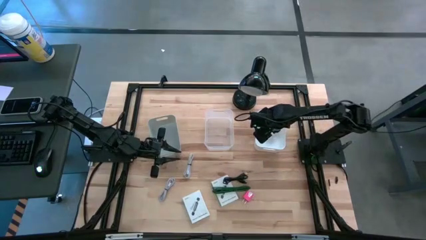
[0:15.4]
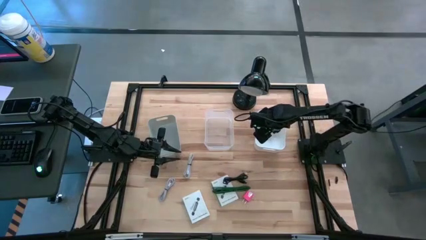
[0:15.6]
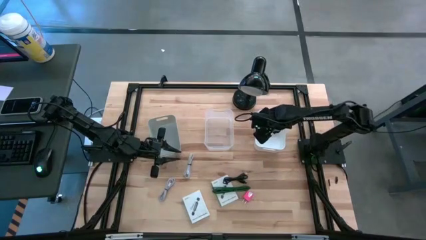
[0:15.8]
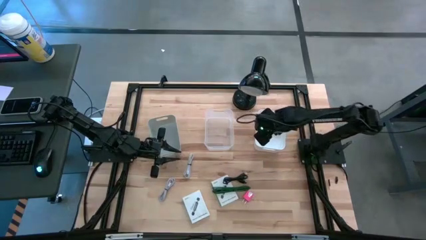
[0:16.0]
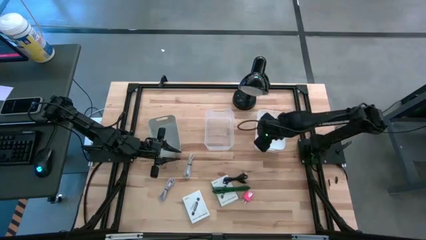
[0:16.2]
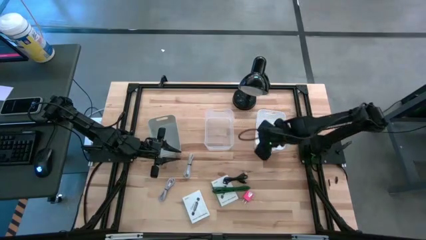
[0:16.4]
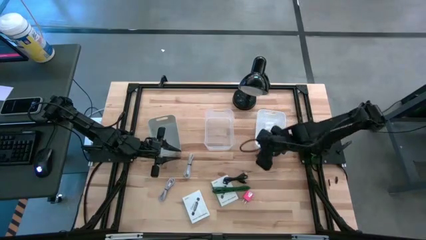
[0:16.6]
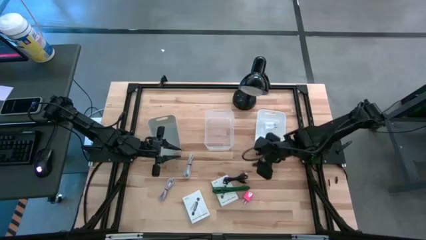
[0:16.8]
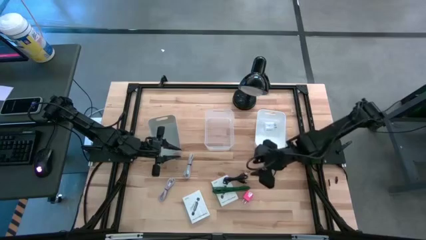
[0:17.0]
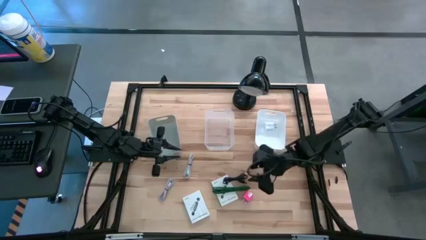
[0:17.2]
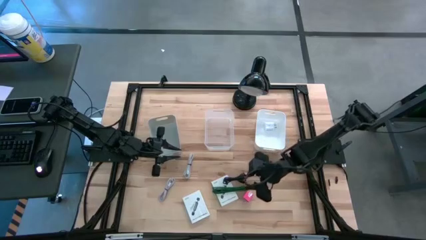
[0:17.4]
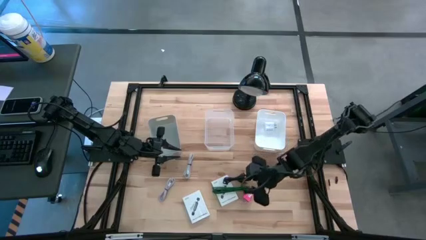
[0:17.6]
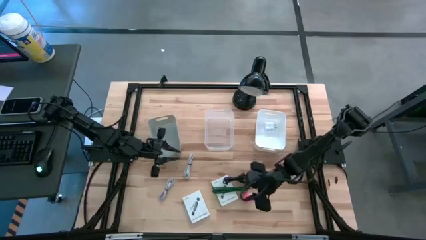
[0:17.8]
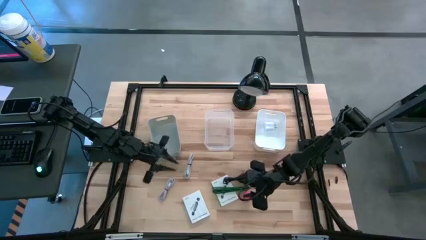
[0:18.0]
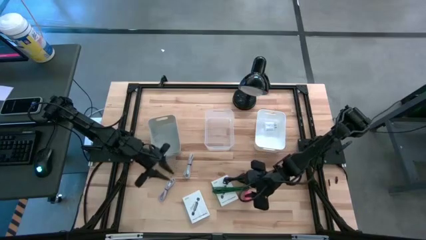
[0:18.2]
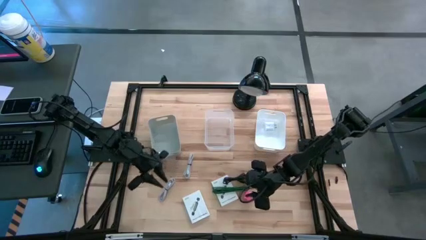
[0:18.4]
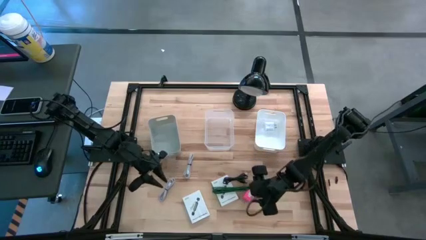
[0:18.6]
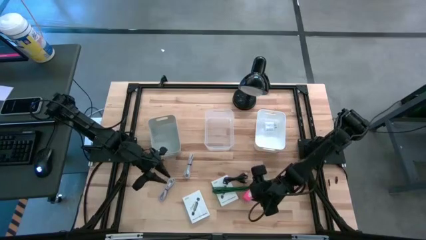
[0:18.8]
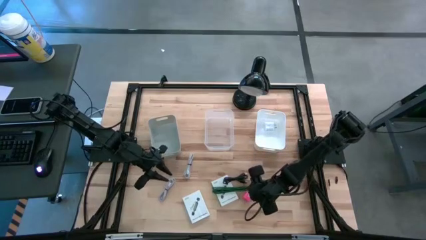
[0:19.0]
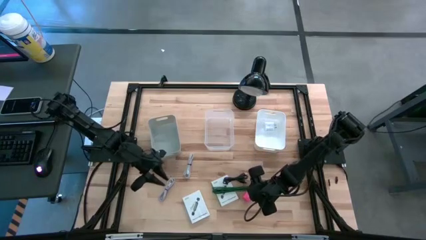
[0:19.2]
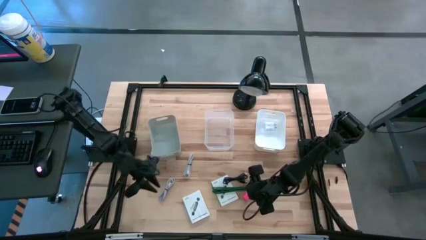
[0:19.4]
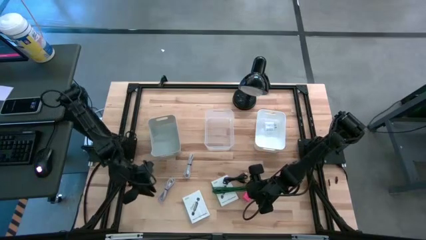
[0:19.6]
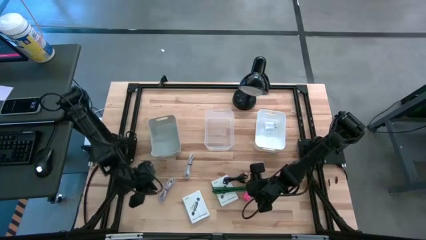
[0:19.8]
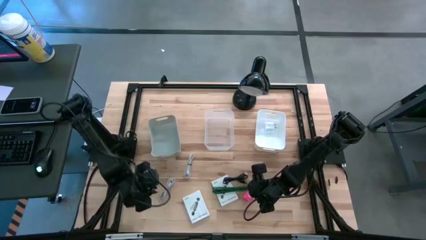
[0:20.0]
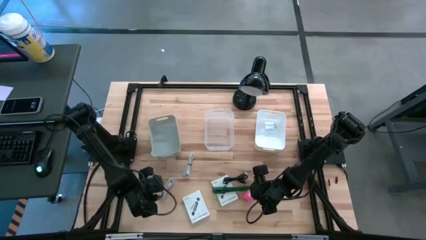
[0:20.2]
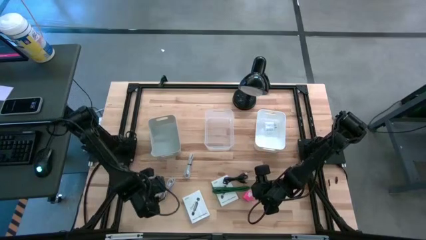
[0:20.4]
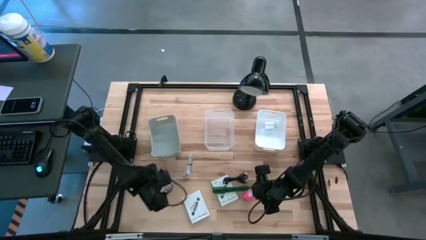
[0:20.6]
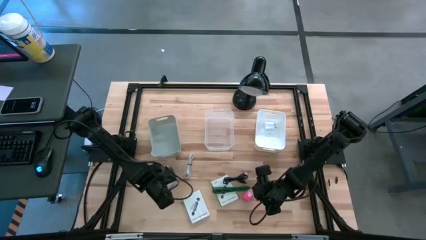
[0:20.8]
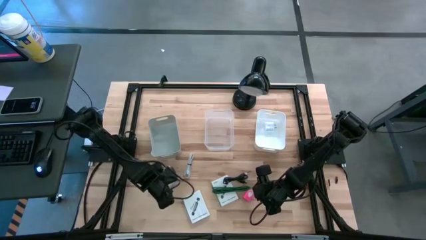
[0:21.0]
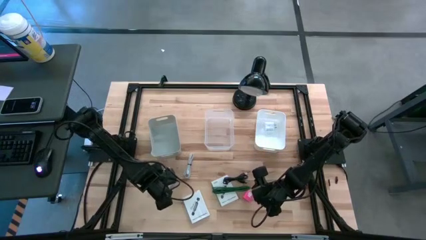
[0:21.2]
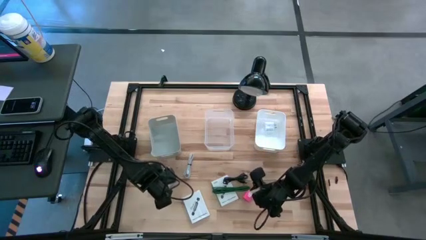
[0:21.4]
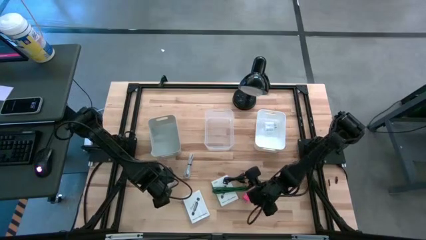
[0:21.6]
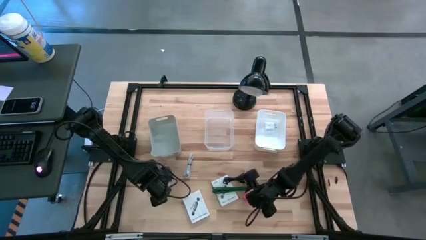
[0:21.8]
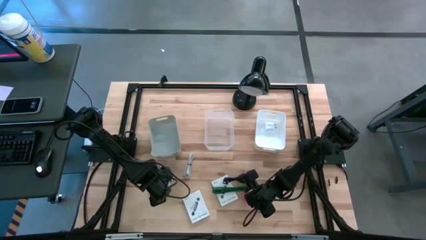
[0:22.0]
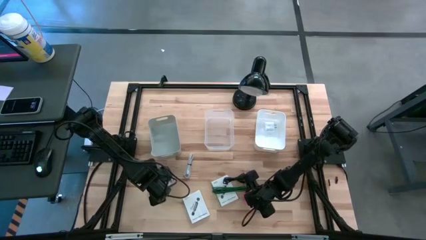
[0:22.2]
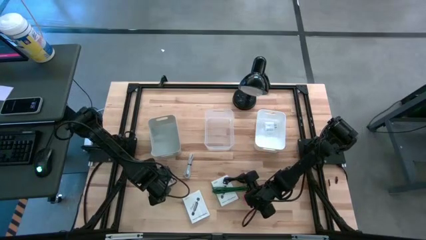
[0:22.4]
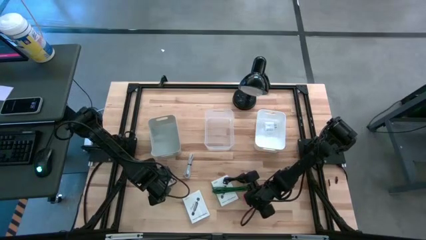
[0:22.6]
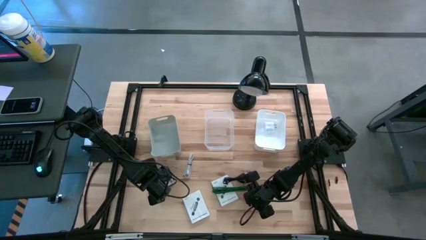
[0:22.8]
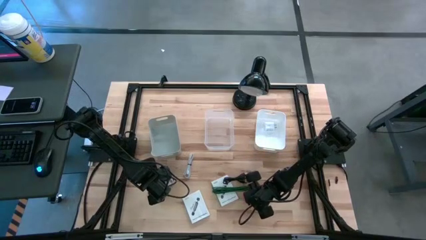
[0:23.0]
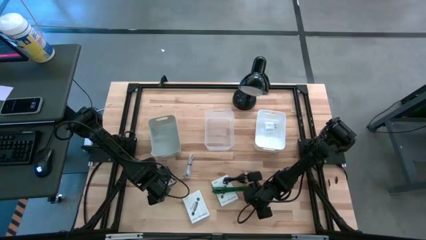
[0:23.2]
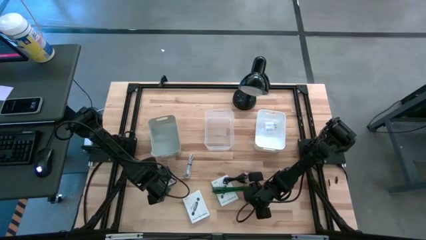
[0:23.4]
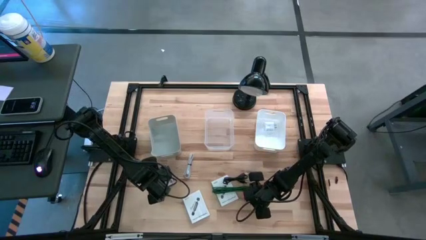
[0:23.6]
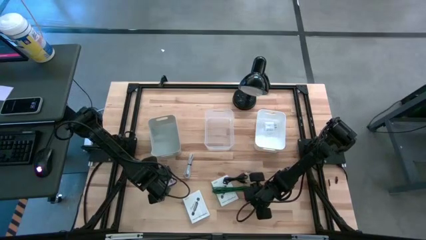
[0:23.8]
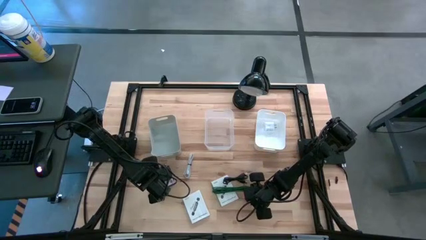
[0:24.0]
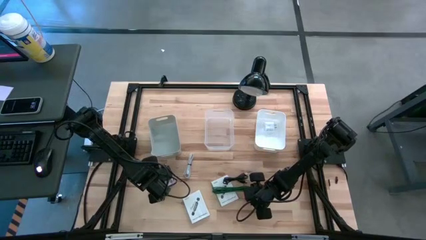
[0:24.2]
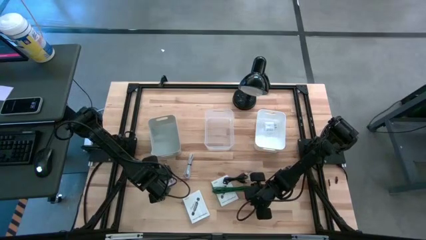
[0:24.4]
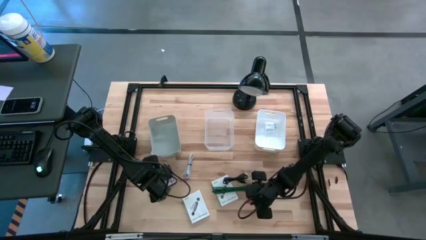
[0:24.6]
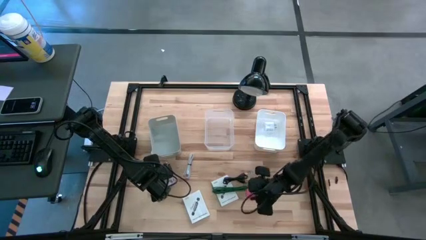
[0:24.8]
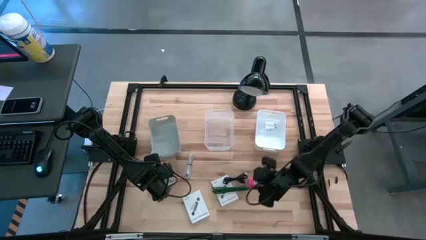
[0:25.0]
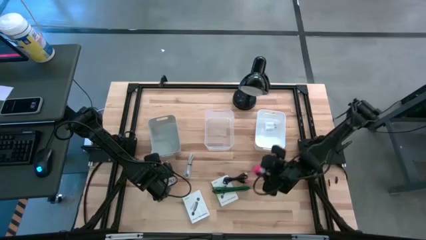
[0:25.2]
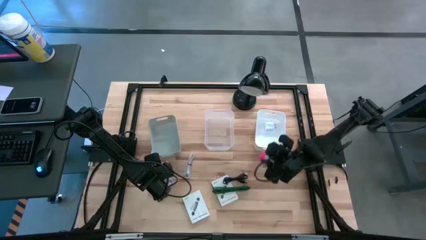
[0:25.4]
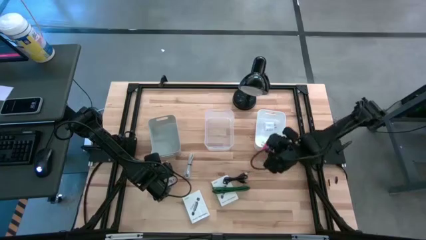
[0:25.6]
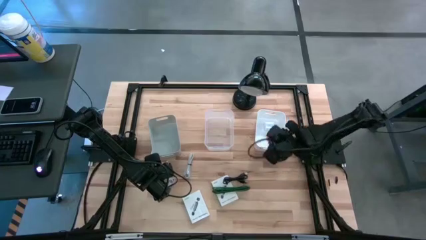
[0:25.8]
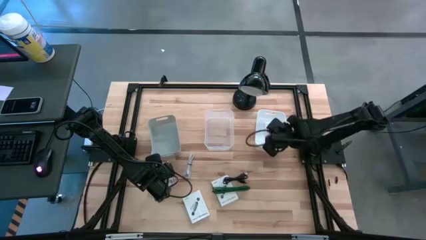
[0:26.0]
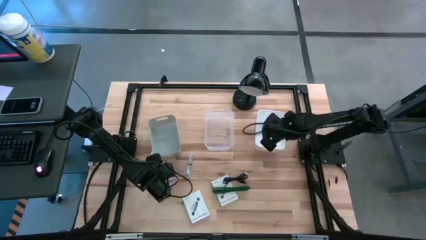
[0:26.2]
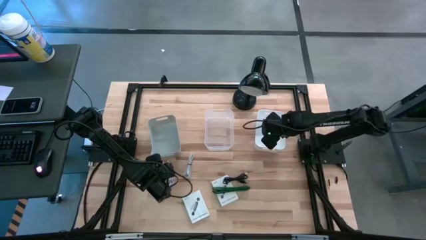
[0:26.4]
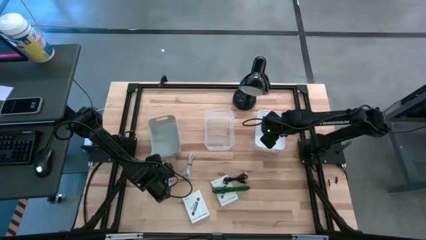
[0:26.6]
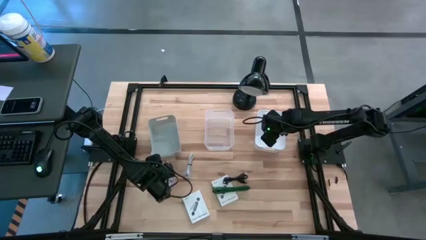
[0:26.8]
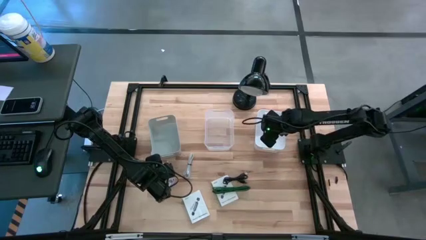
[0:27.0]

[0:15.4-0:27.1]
Task: Pick and place items into bin
Put the pink charger adapter into the white bin

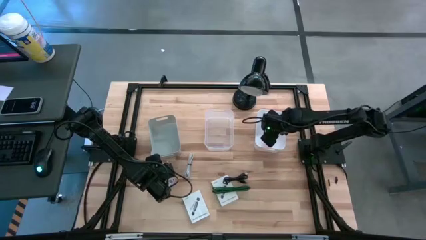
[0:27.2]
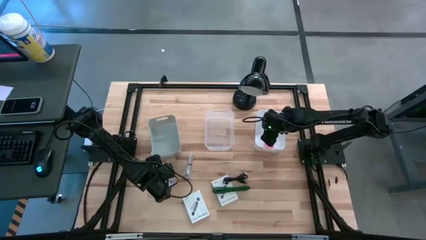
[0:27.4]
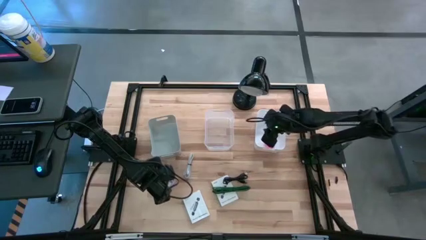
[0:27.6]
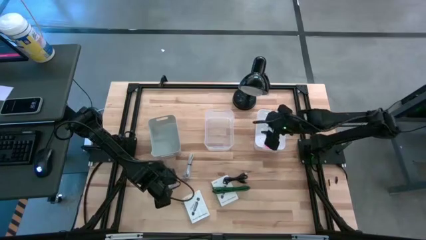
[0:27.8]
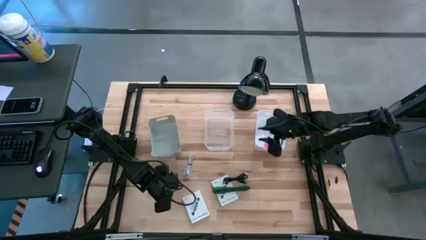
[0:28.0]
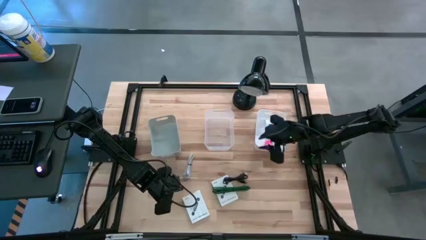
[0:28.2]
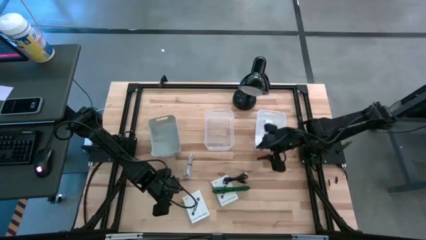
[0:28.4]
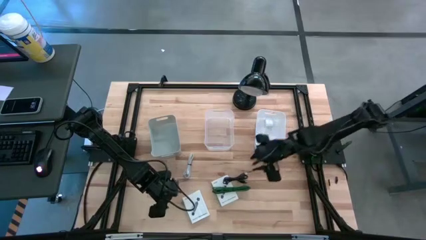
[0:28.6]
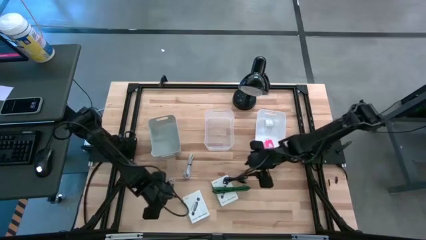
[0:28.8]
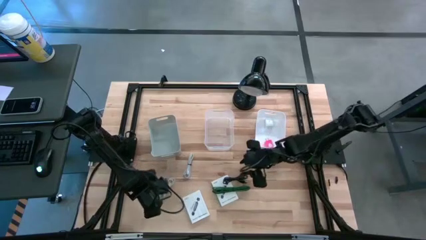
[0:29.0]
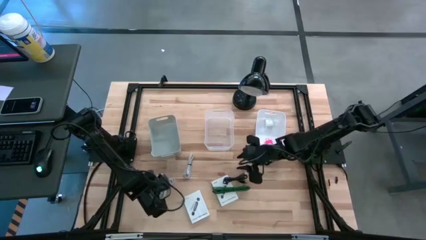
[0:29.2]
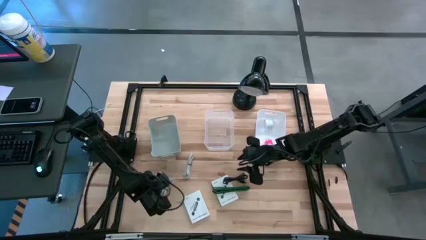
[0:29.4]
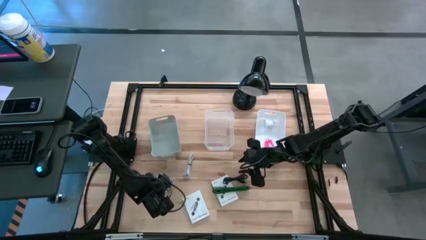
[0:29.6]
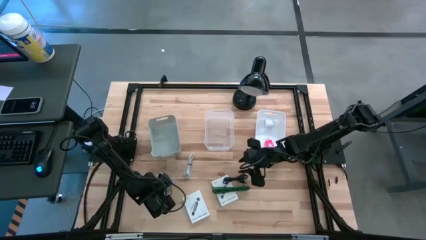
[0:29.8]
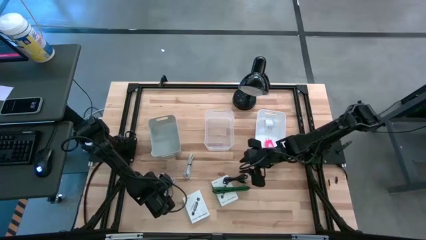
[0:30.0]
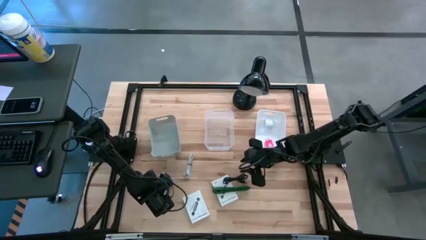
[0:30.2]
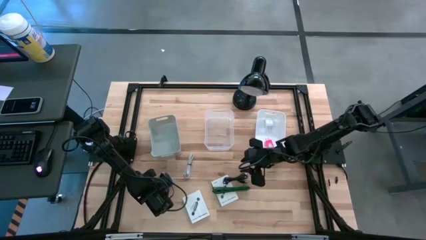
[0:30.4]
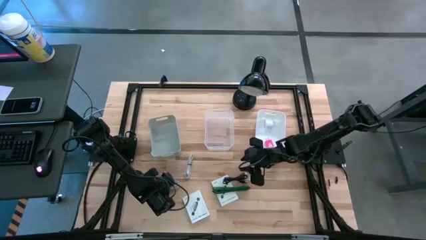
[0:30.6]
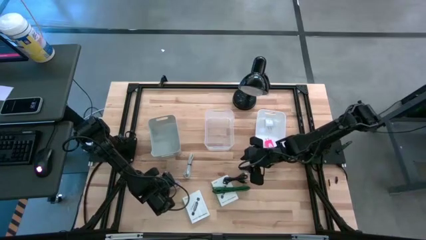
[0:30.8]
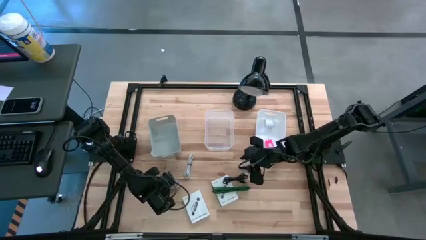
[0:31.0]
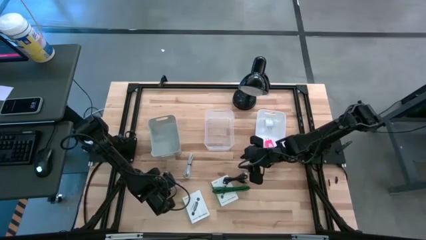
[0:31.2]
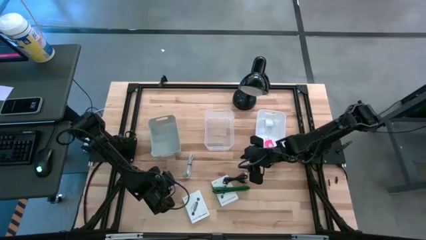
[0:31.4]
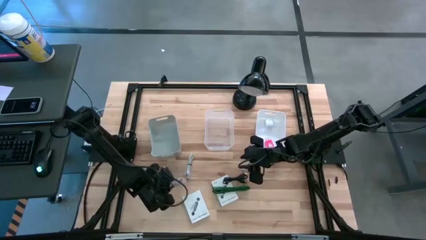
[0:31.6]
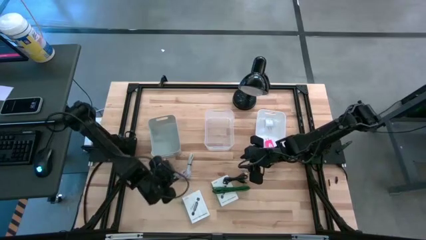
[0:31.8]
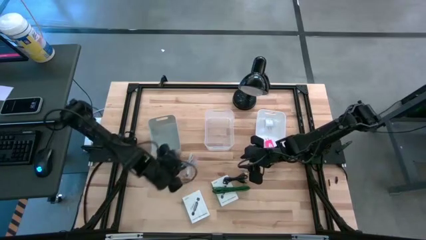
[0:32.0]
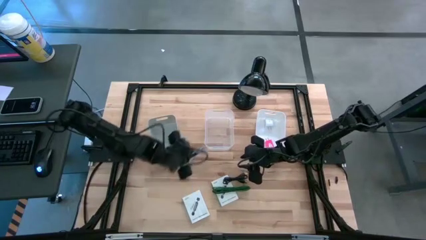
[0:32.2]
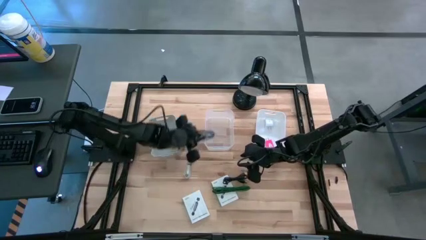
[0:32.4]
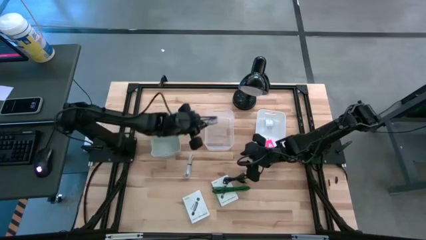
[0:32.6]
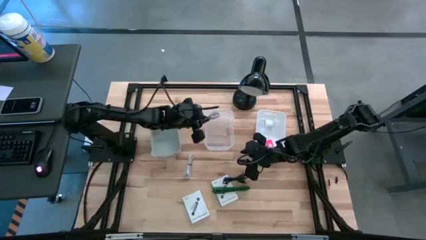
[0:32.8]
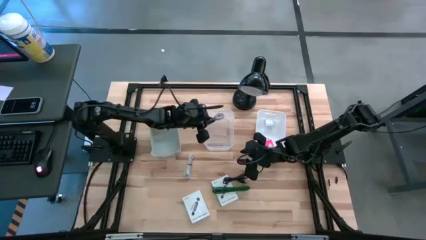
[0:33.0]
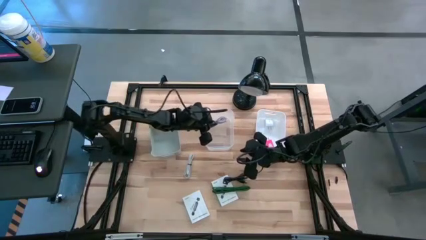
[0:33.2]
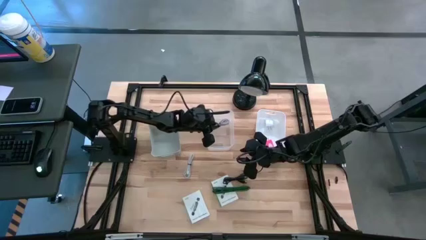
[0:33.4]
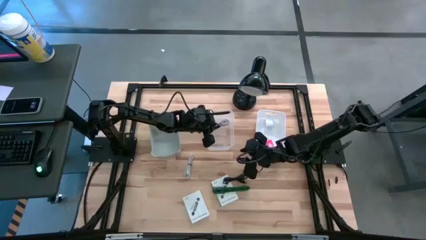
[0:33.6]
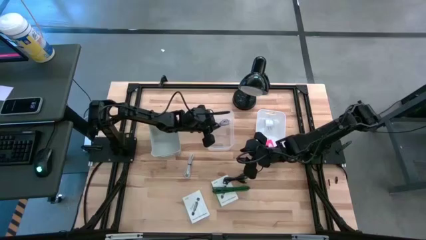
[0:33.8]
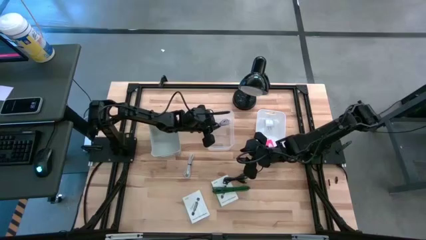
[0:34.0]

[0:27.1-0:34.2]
Put the purple charger cable into the transparent bin
